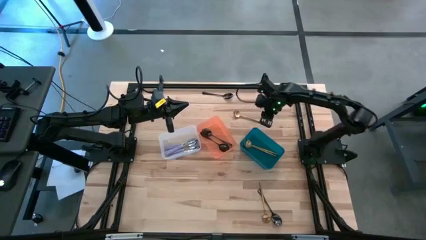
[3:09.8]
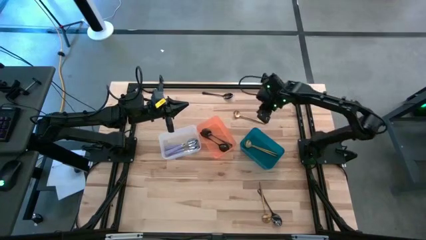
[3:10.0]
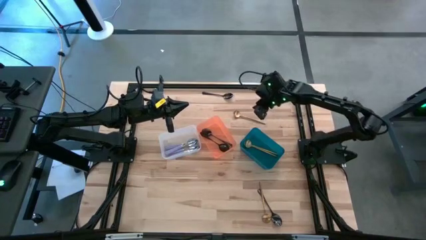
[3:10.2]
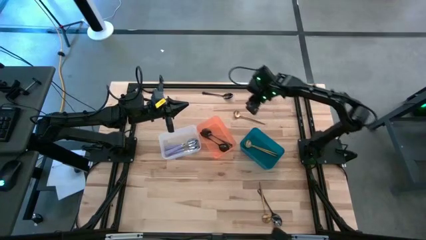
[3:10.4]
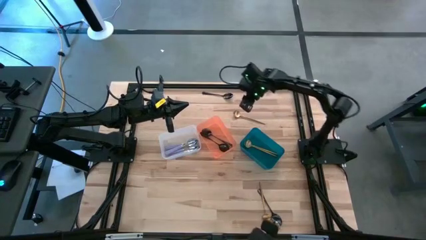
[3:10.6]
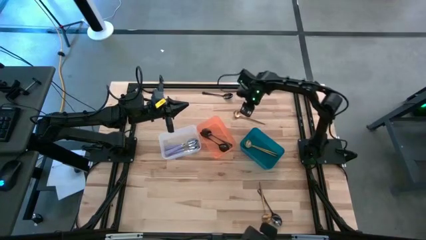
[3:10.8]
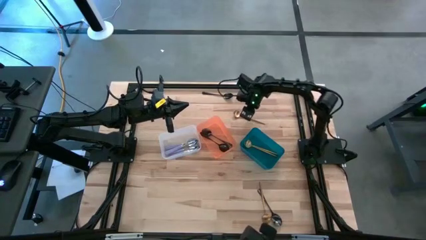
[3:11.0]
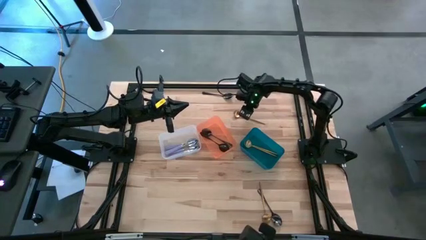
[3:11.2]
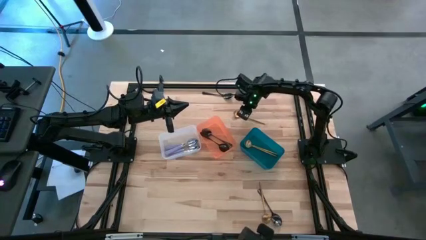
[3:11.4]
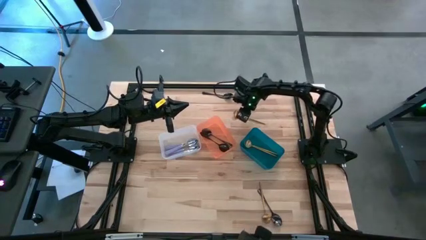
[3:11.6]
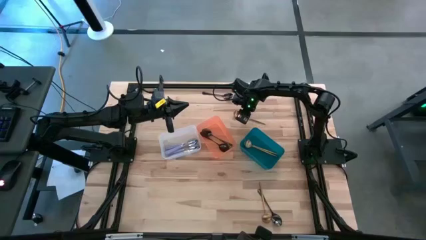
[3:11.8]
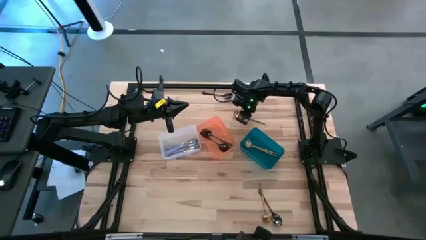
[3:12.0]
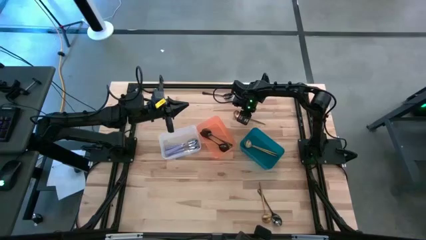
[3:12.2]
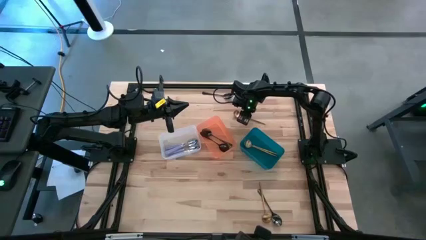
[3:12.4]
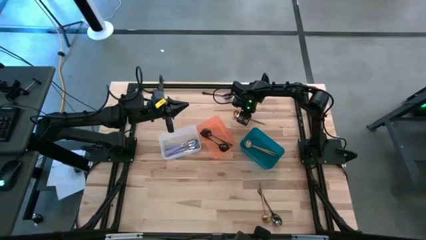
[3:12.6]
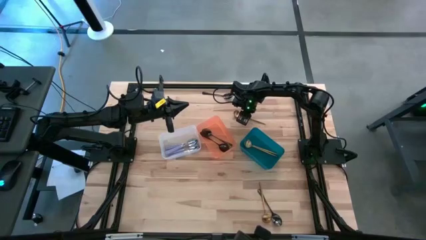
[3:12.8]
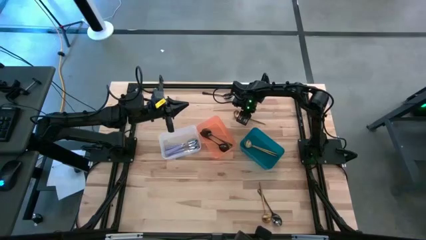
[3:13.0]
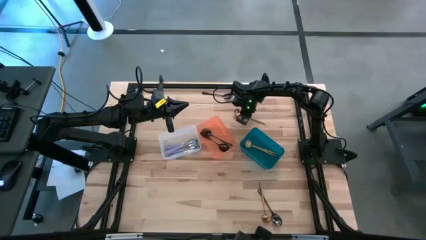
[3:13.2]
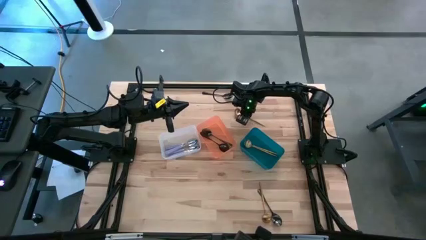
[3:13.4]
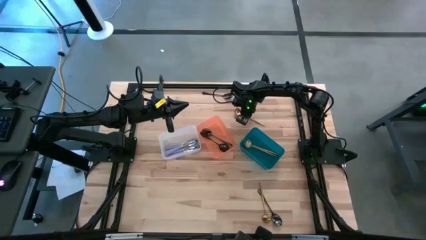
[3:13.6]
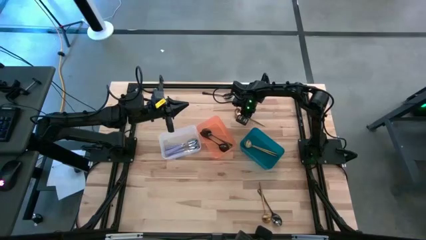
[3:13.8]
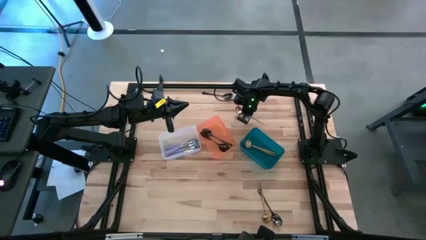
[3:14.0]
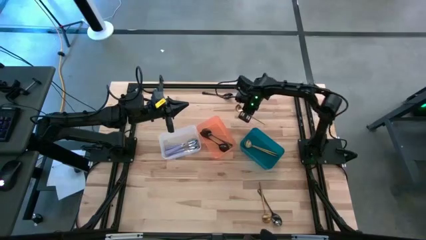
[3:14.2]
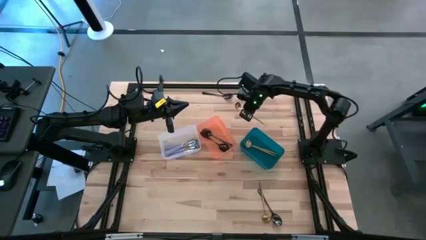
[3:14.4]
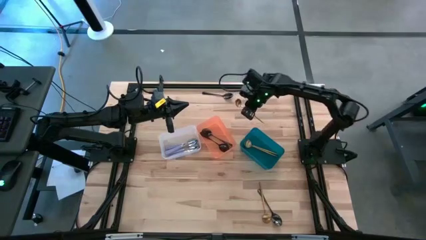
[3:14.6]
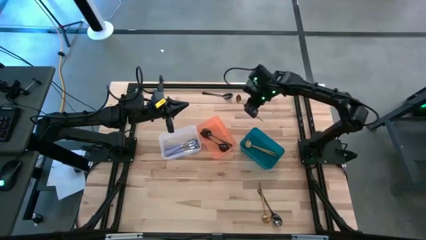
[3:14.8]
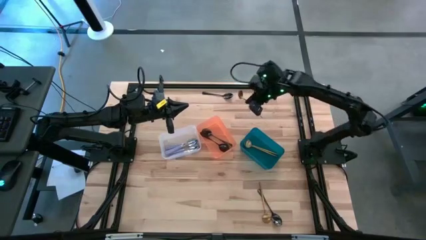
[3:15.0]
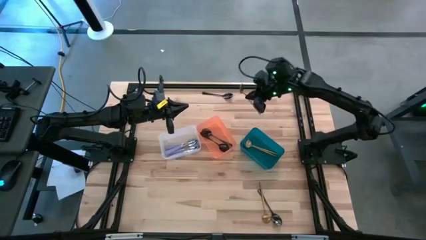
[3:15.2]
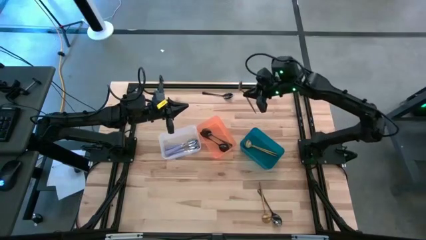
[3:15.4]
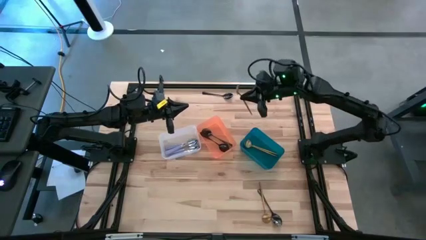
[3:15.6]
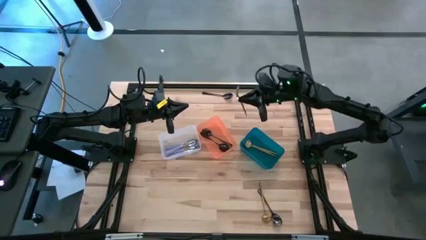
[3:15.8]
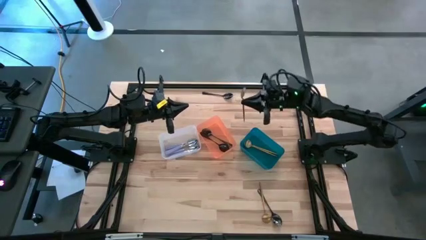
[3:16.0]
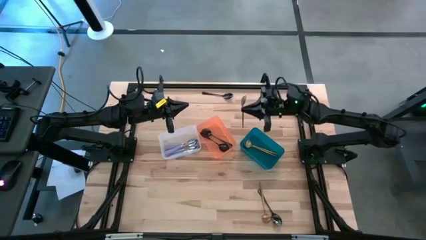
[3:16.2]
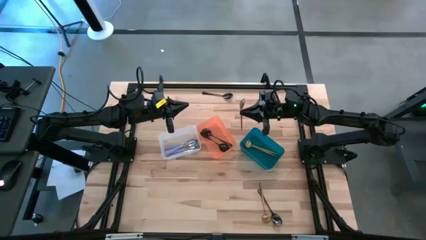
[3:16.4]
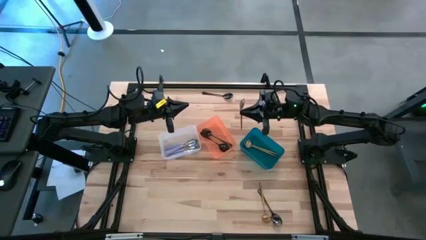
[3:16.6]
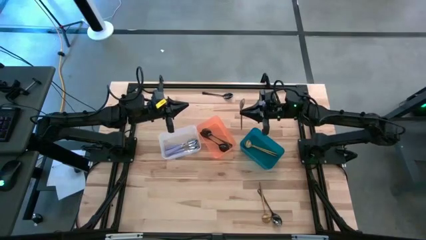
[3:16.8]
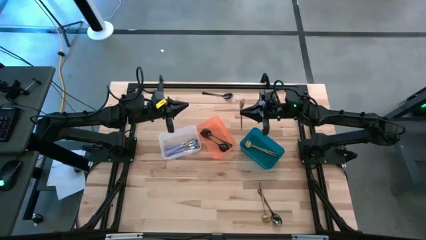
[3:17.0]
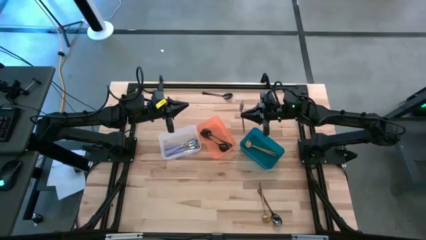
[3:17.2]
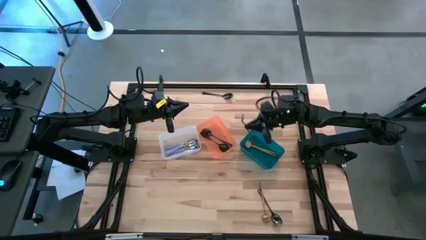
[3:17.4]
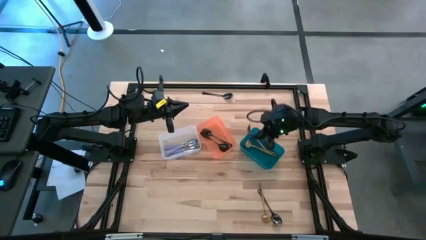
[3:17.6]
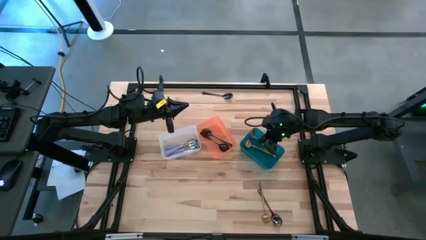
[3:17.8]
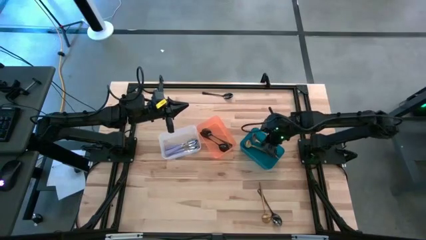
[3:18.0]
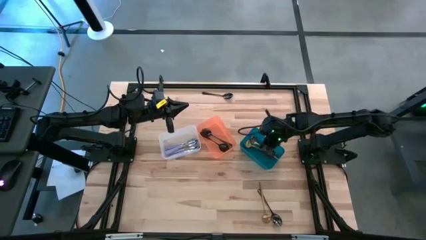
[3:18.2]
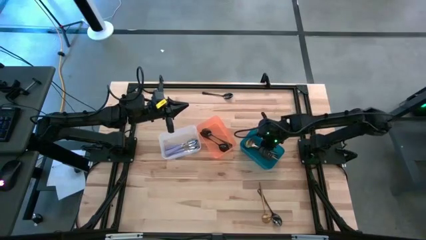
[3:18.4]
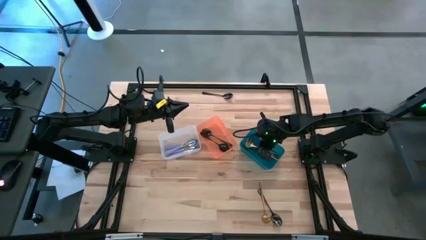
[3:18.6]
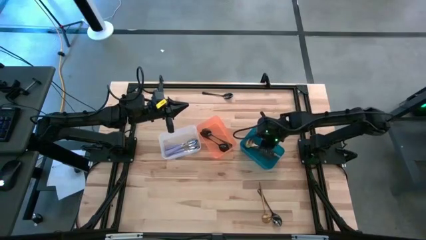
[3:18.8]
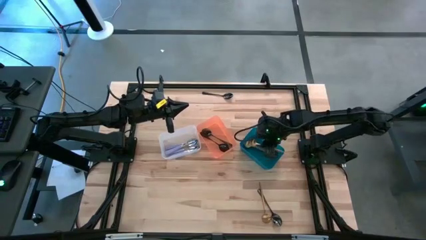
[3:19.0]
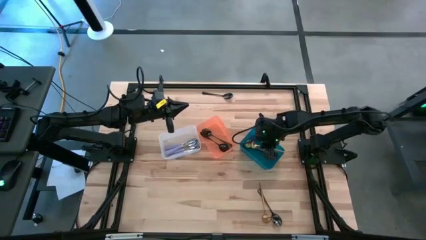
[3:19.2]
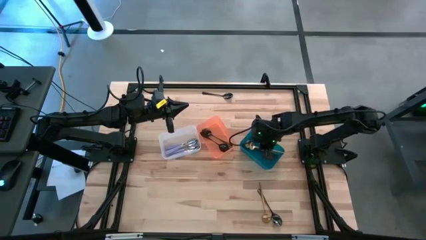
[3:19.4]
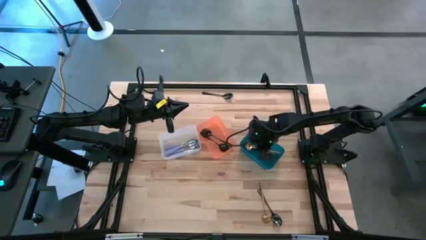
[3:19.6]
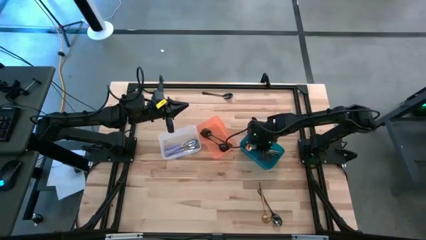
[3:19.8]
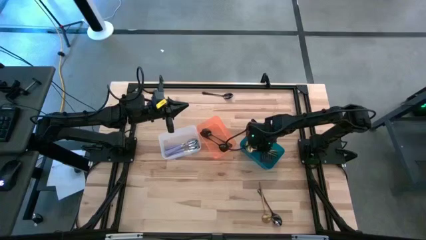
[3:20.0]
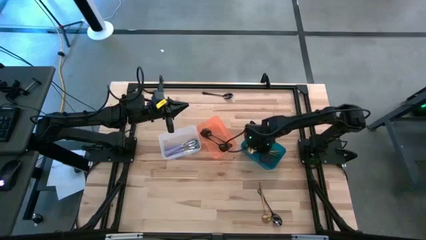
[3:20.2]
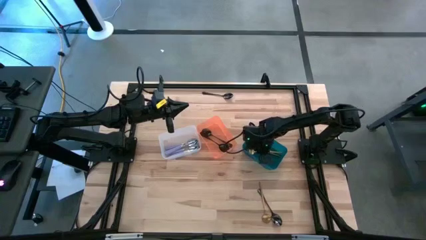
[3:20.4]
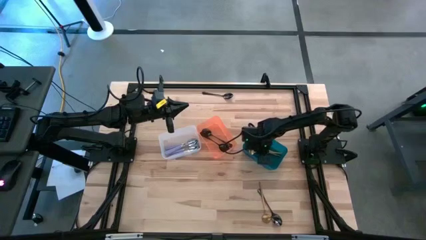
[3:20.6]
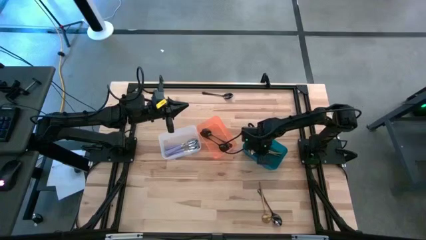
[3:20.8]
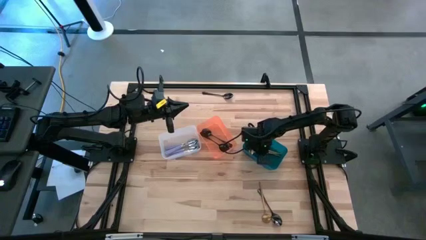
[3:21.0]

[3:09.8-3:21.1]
Task: Sort silverware by color (type)
Put the gold spoon into the blue bin

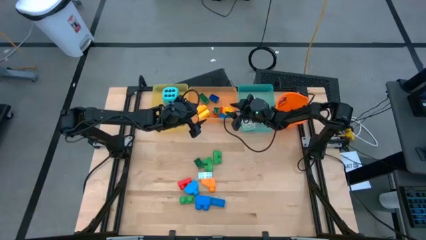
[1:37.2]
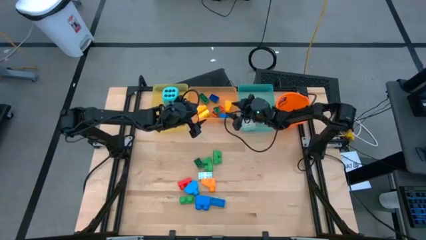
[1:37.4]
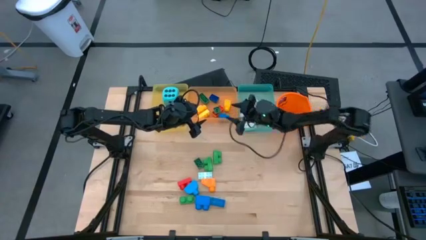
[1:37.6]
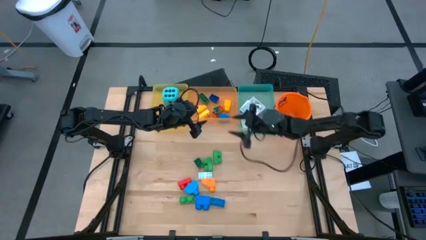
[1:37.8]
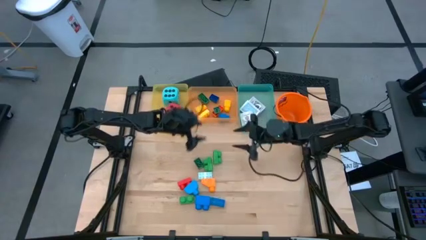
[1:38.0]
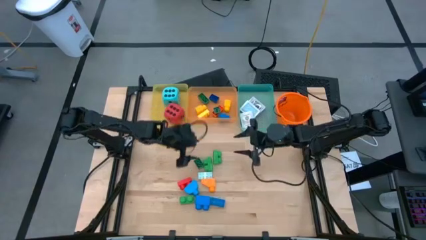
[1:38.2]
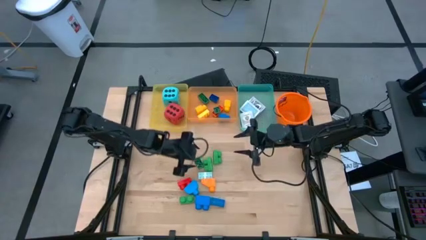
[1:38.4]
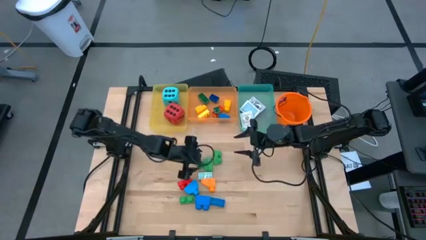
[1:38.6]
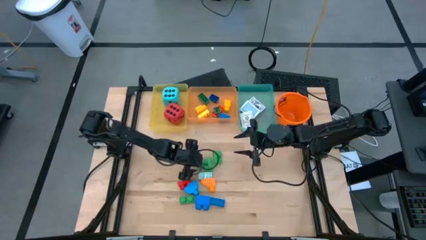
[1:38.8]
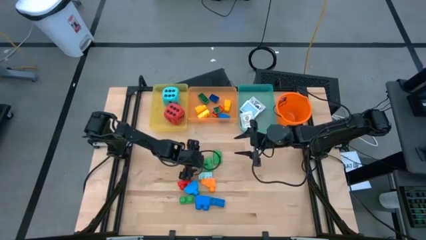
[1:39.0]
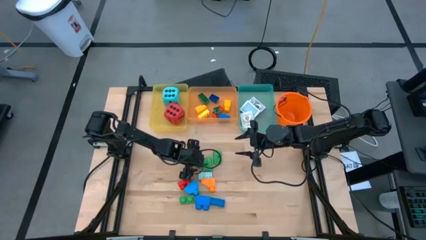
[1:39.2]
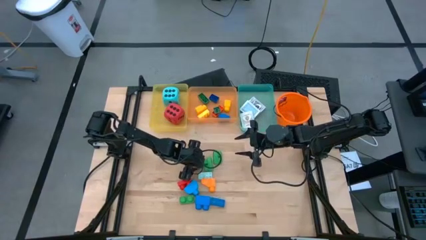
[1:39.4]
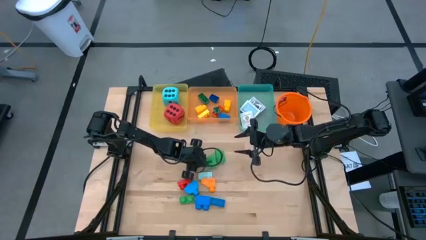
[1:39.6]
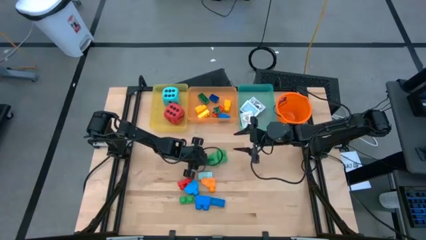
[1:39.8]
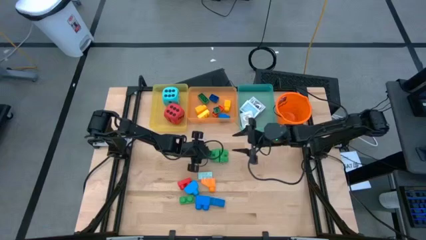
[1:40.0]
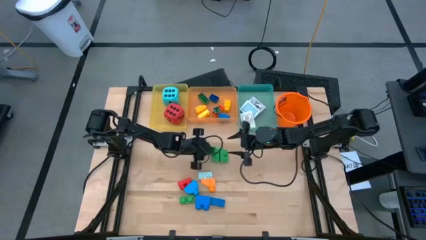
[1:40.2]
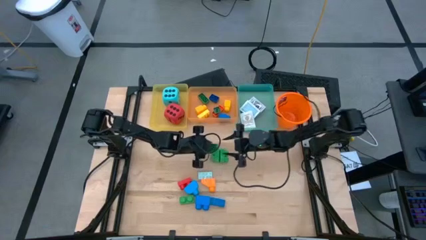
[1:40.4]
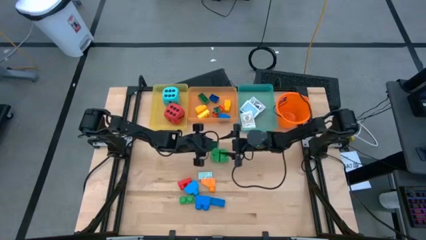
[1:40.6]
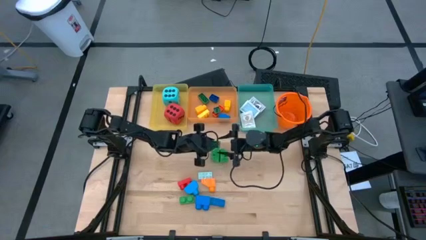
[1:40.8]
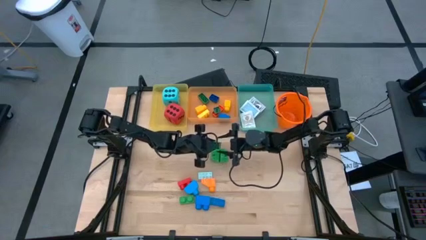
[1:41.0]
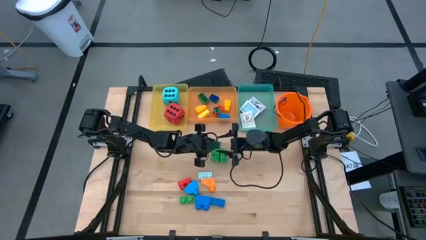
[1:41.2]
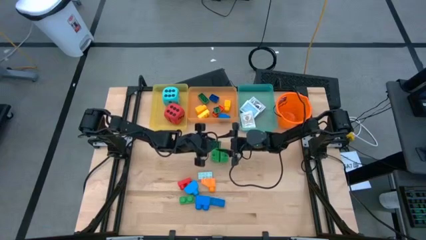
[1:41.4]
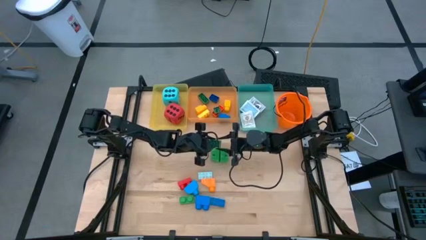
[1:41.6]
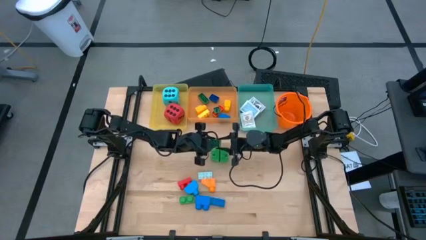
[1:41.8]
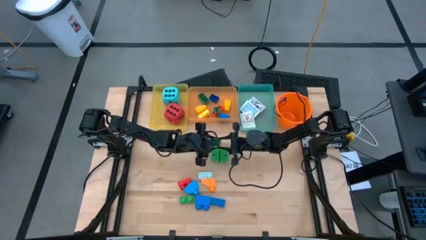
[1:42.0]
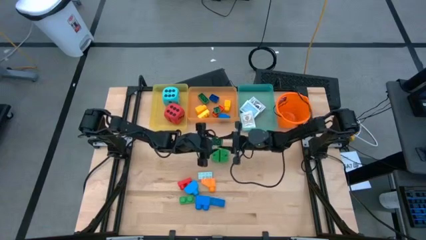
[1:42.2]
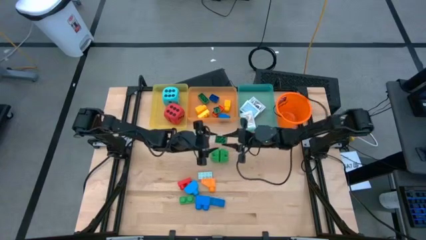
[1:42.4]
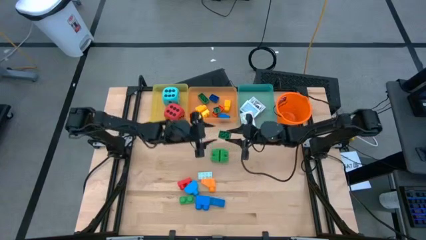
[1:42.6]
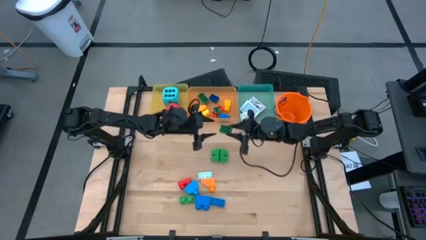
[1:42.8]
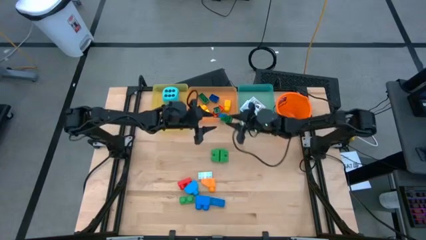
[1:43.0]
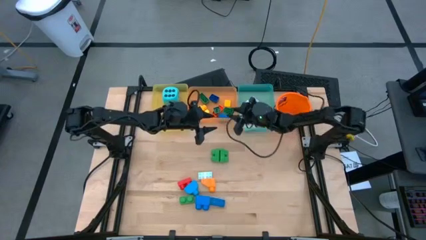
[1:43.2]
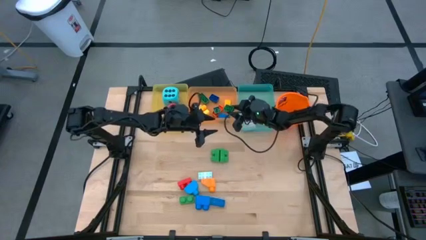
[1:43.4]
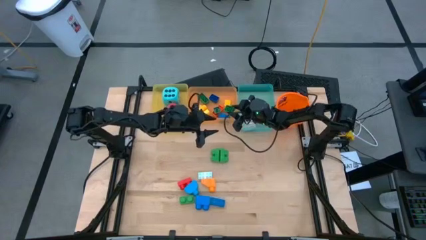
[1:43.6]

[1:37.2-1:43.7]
Task: Pick & Place Toys
Put the green game piece into the orange bin
